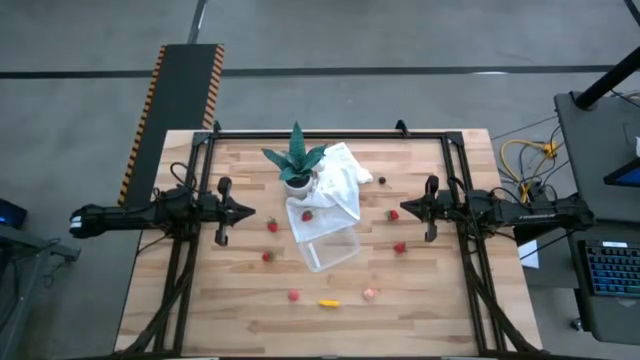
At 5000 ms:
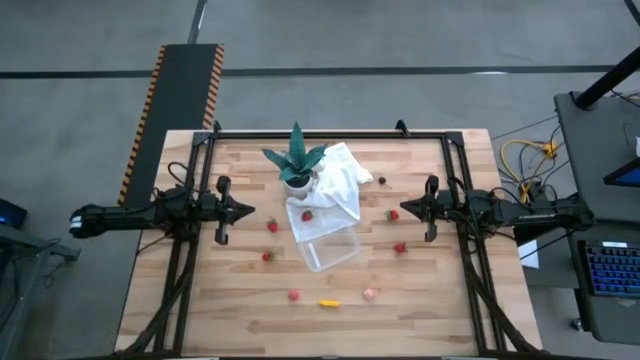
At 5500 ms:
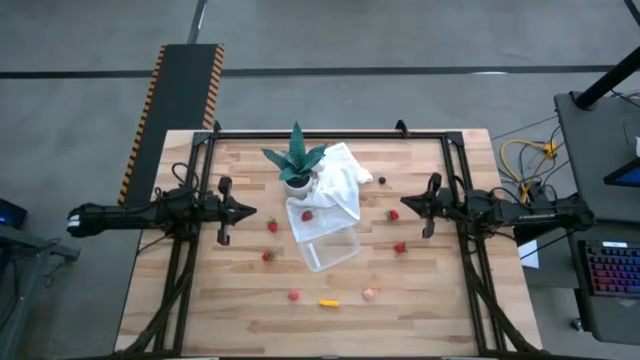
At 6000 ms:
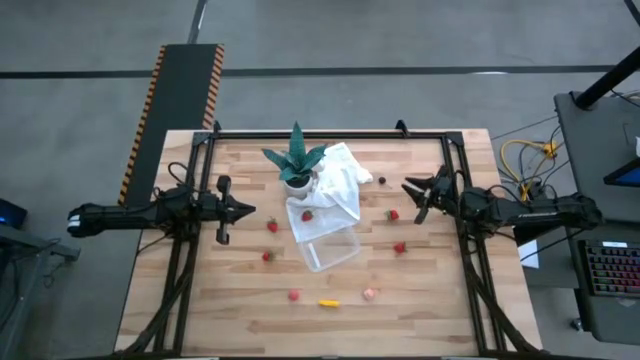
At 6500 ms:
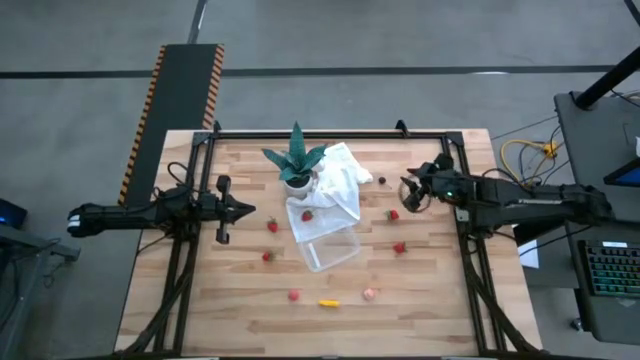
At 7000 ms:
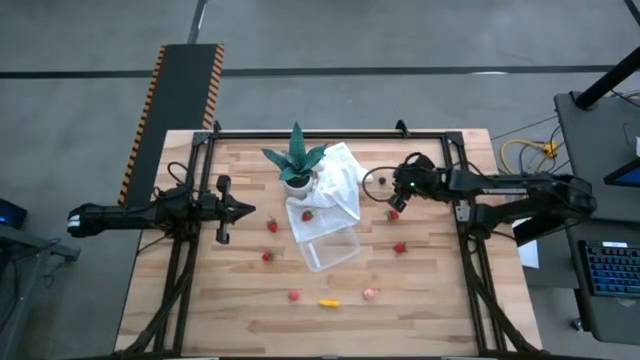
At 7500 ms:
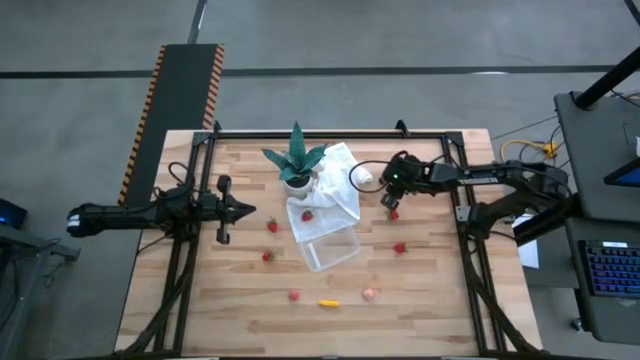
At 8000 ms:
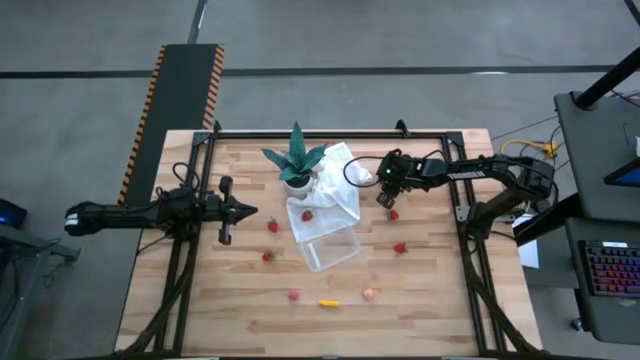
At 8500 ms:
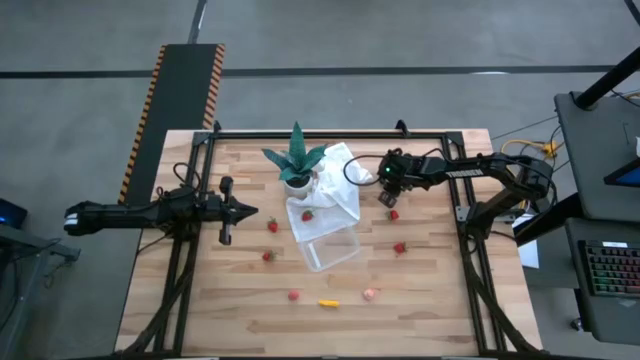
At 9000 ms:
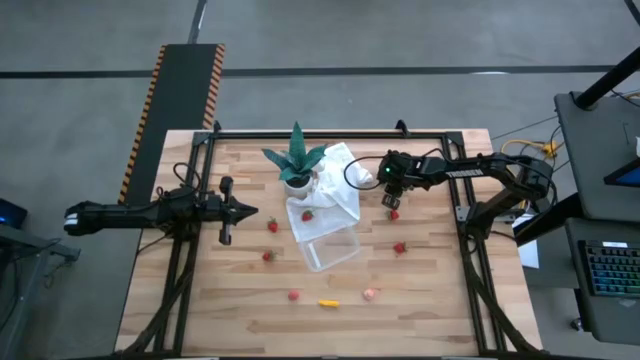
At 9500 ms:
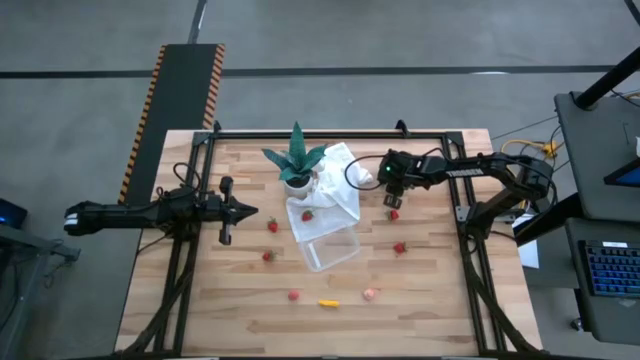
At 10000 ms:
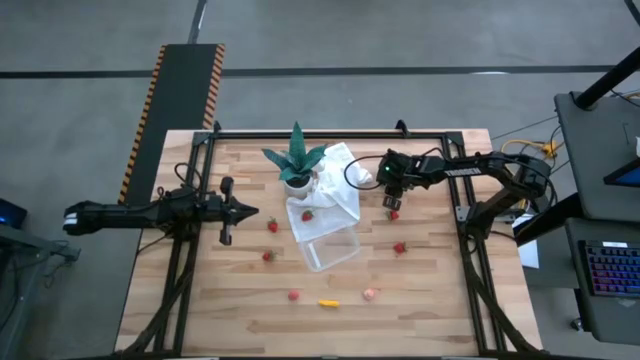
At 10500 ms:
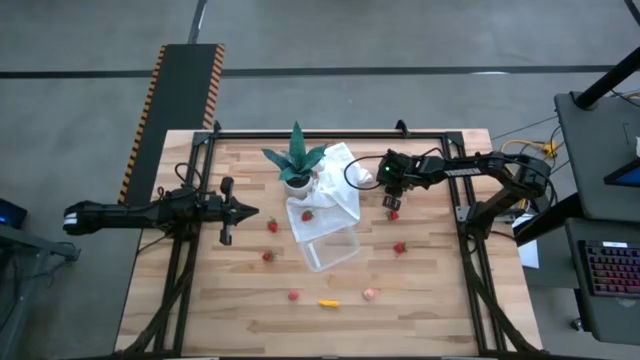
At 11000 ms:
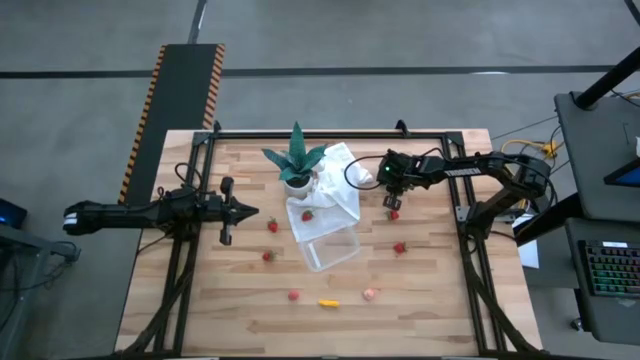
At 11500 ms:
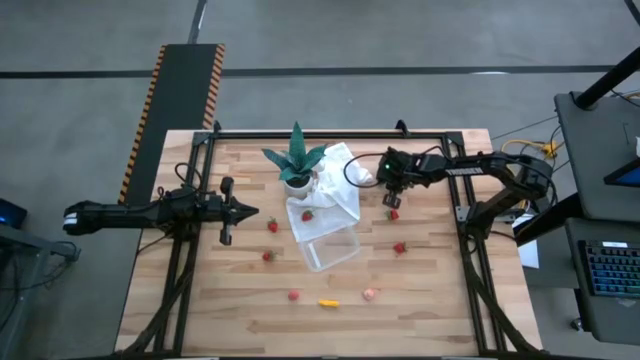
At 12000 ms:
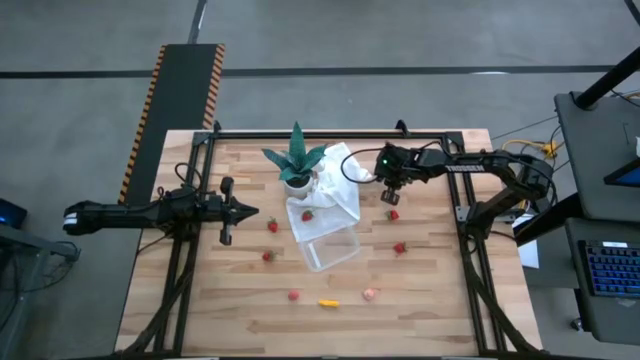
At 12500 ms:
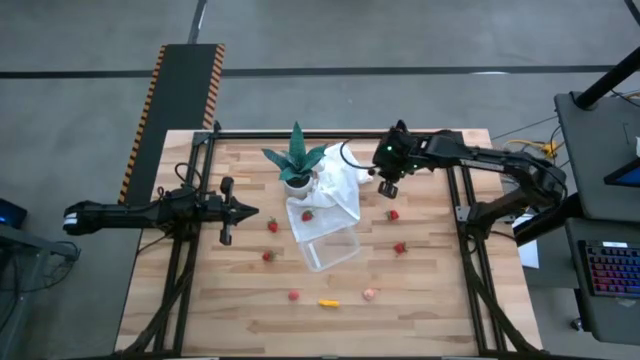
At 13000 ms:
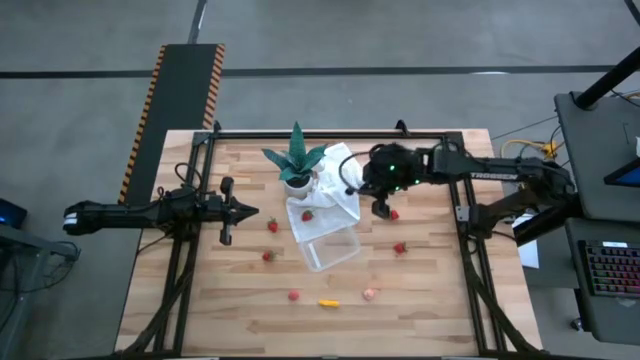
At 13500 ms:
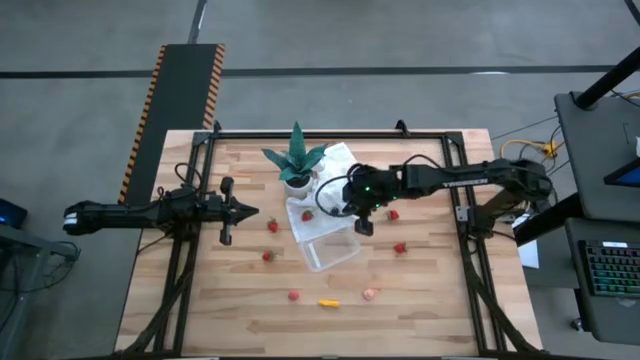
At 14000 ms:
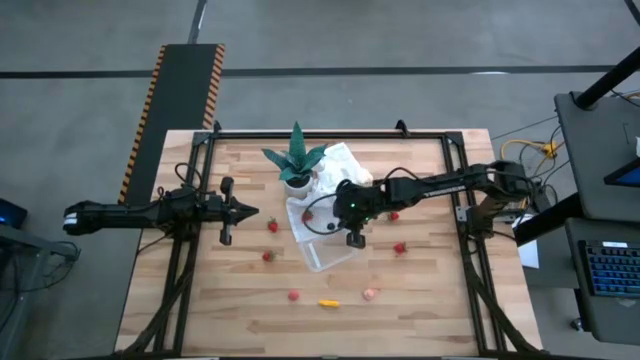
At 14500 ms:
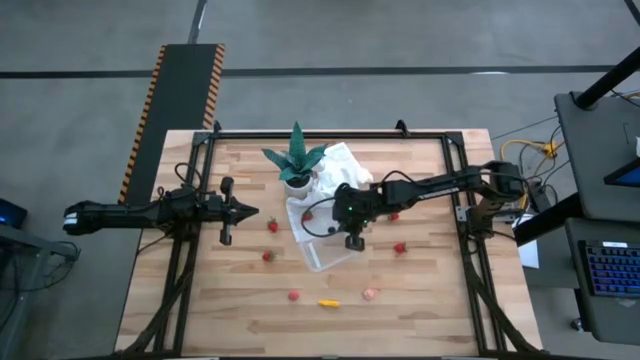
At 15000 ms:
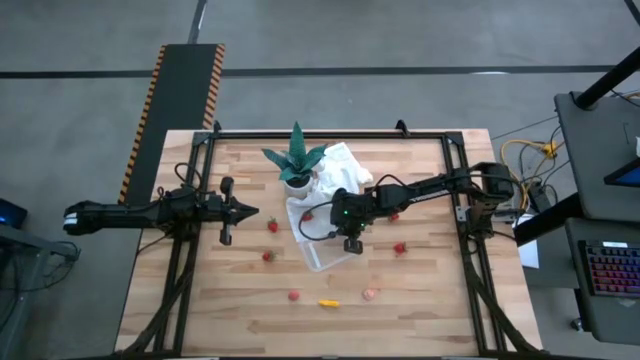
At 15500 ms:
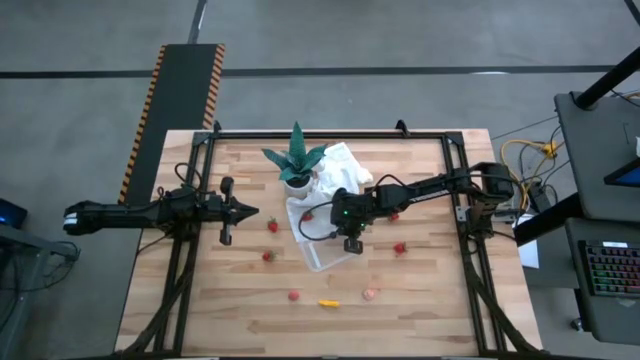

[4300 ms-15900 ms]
Task: Pick and placing Produce into tupperware
Put the black cherry into the transparent bin

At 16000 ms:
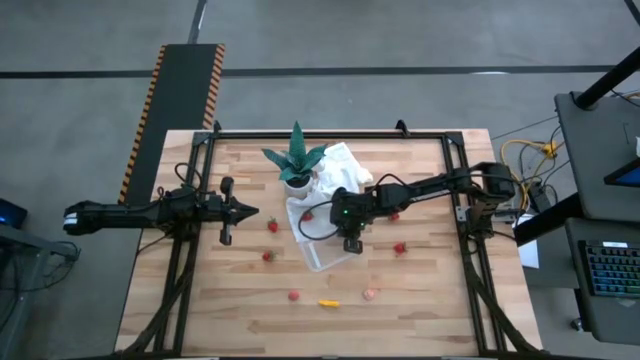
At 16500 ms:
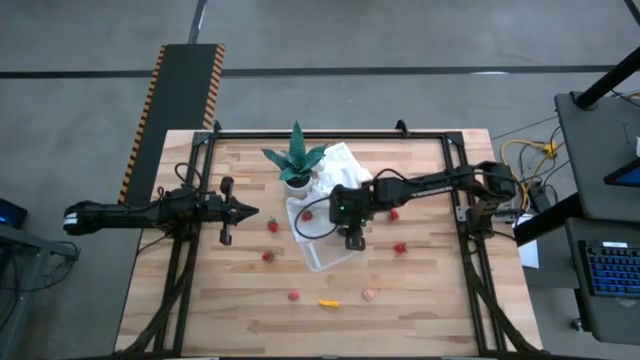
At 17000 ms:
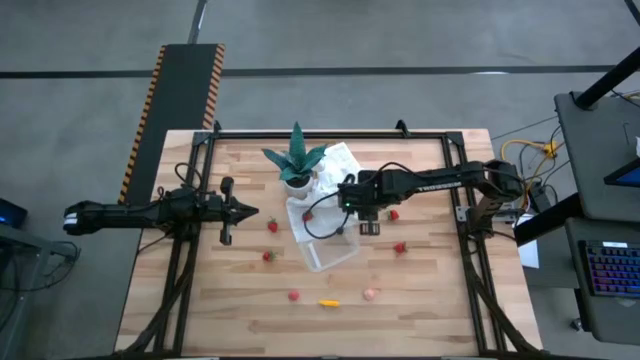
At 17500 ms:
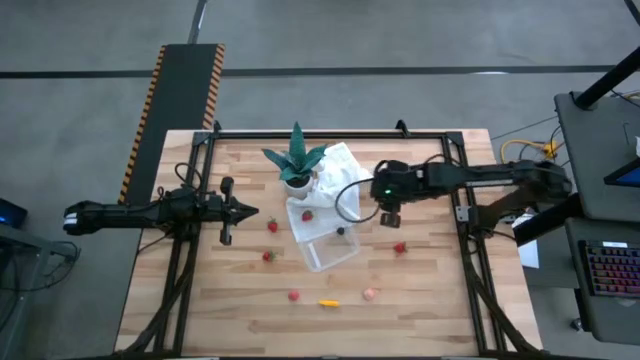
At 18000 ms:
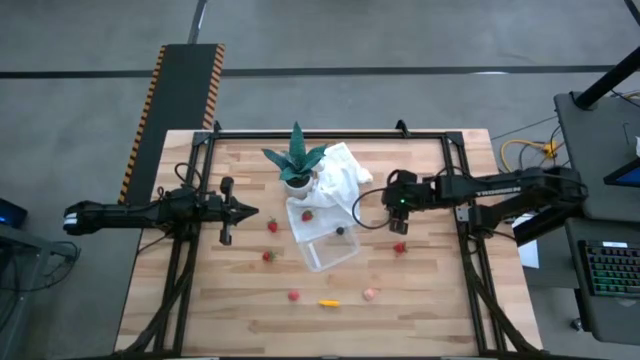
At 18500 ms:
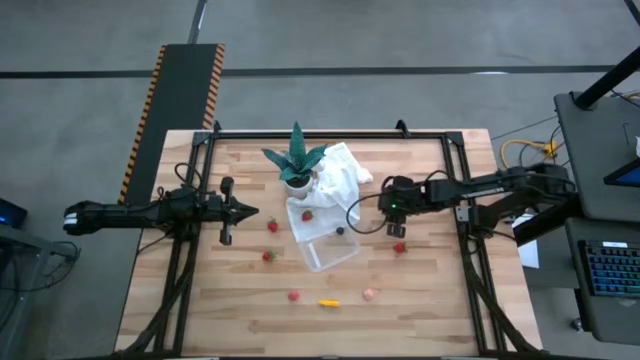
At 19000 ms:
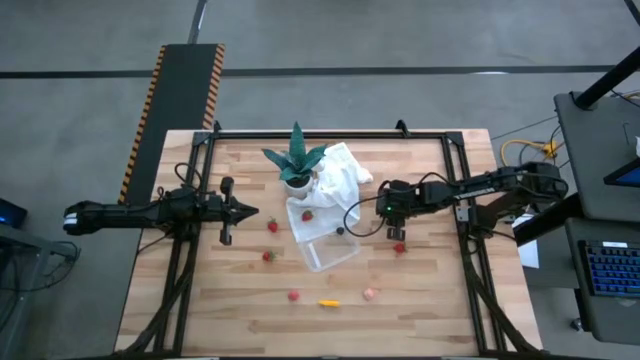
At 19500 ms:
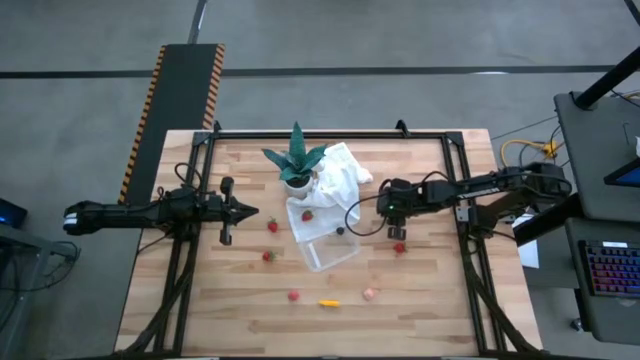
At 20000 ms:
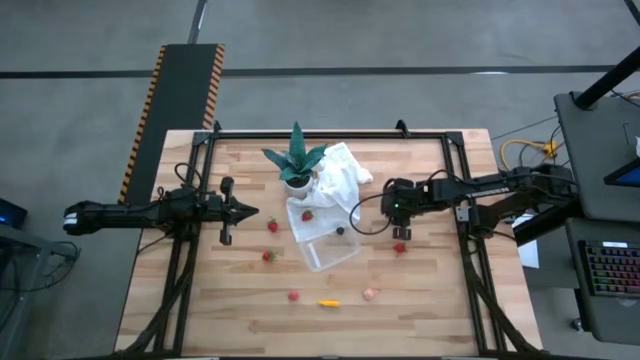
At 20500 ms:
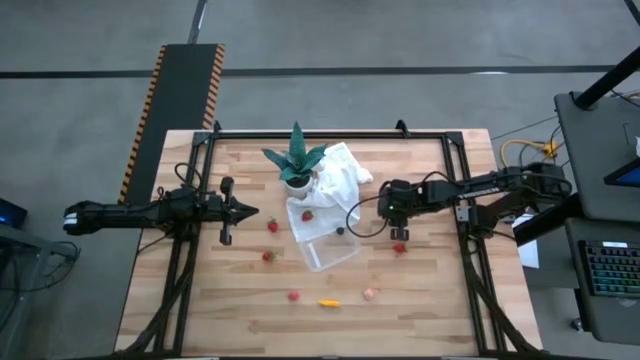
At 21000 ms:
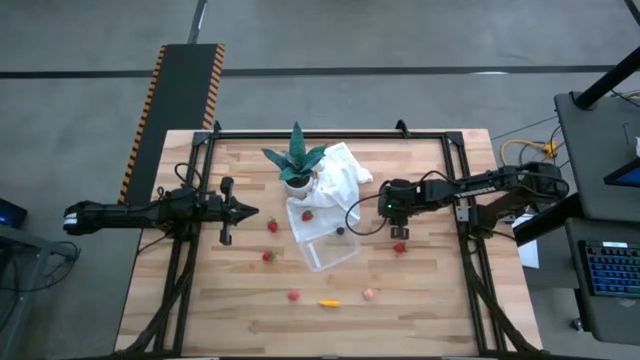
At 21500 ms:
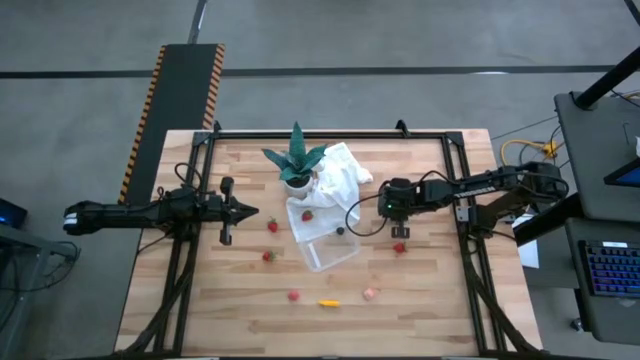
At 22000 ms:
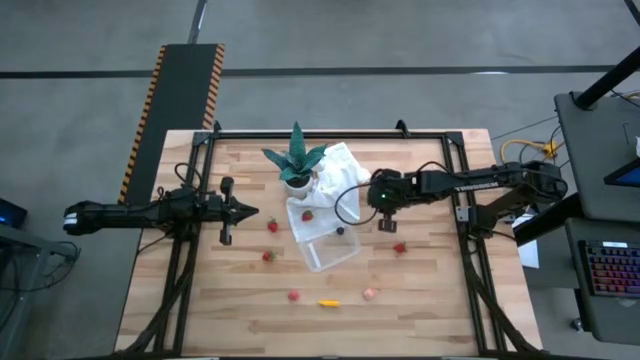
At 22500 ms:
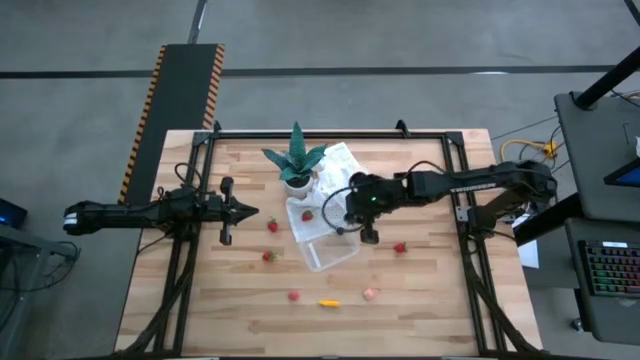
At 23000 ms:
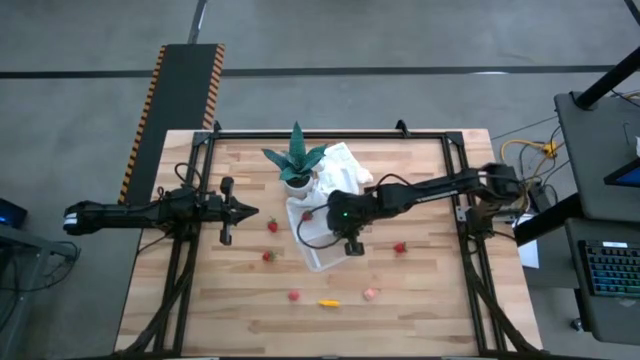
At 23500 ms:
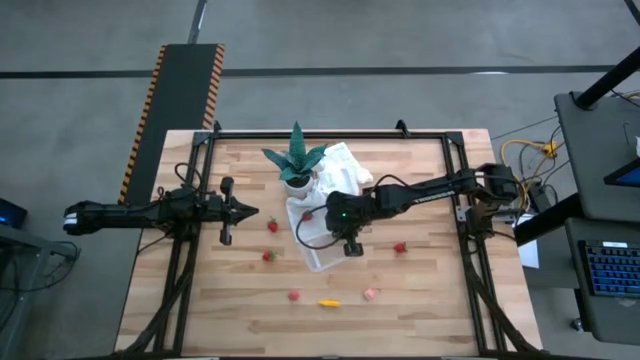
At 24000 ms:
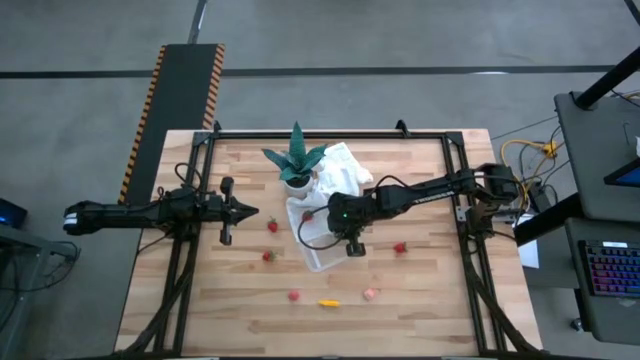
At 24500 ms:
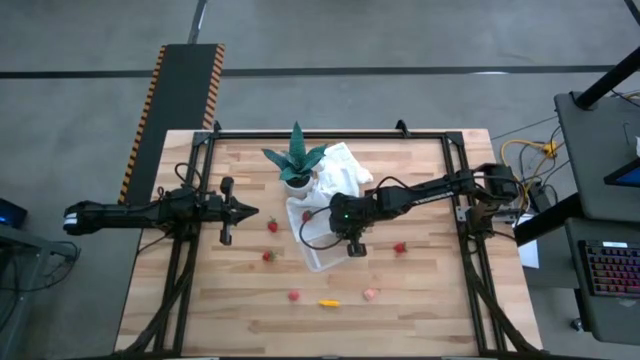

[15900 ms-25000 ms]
Put the strawberry into the transparent bin
